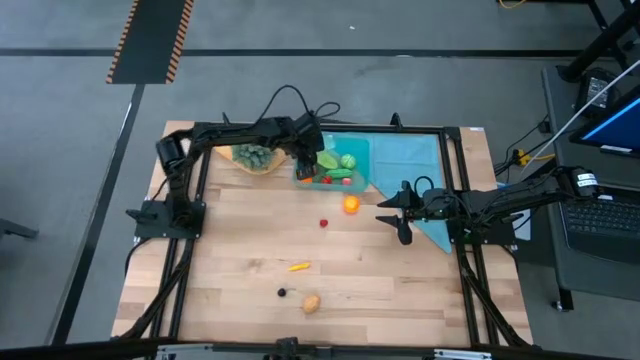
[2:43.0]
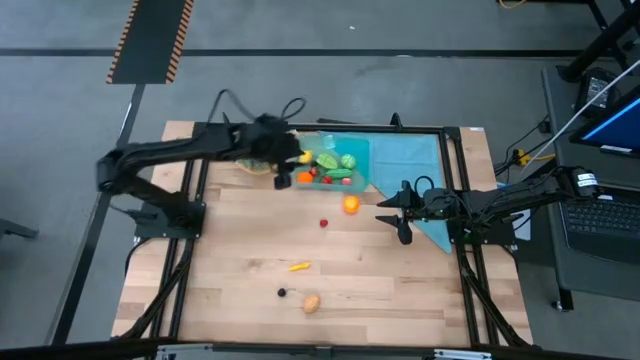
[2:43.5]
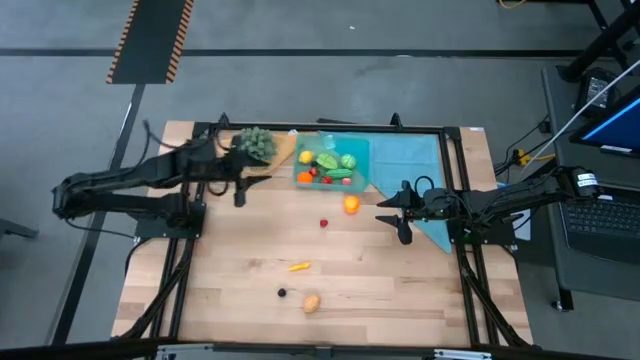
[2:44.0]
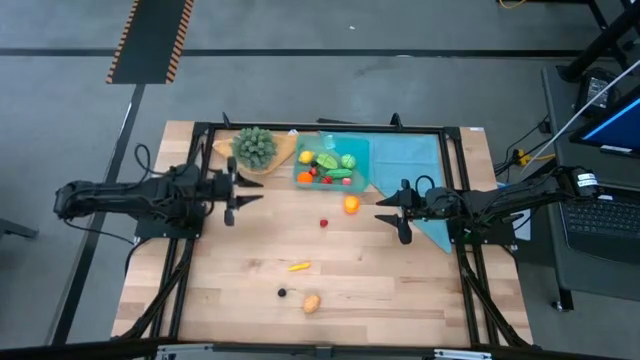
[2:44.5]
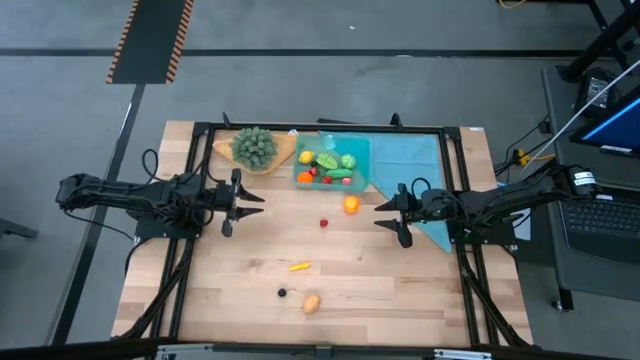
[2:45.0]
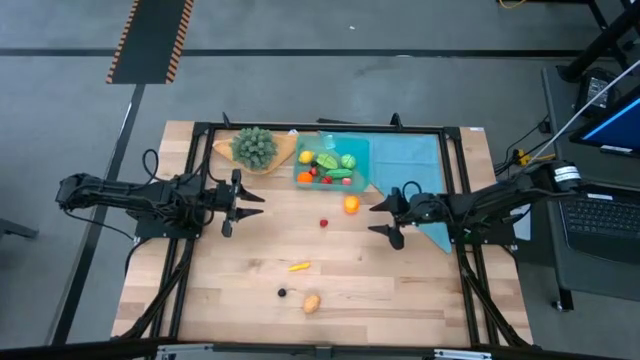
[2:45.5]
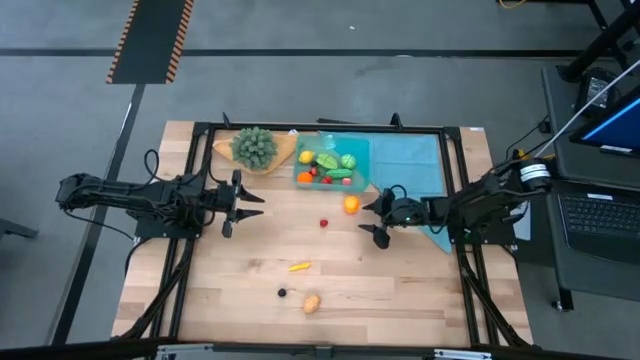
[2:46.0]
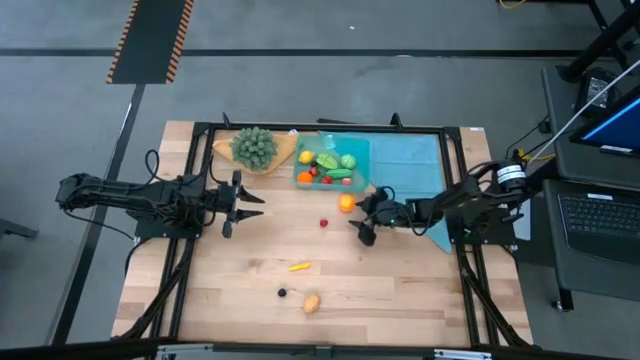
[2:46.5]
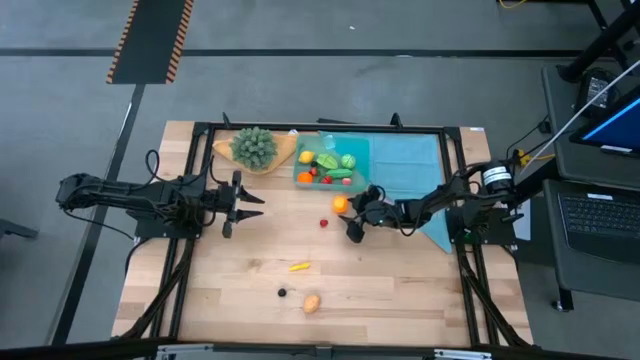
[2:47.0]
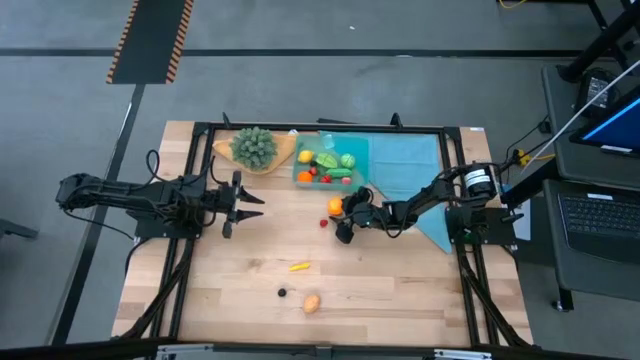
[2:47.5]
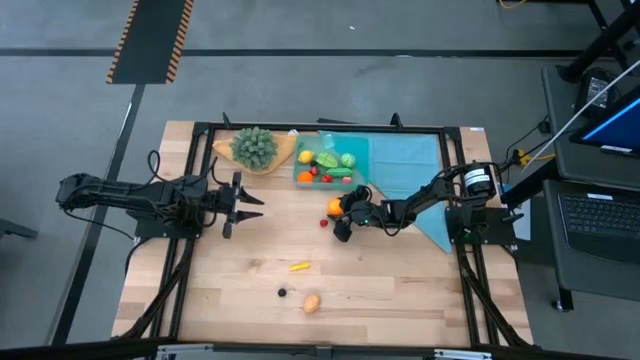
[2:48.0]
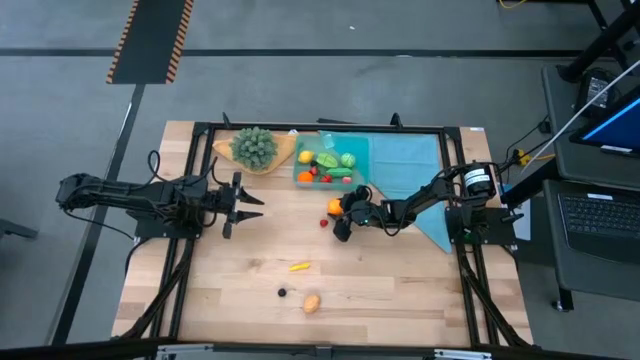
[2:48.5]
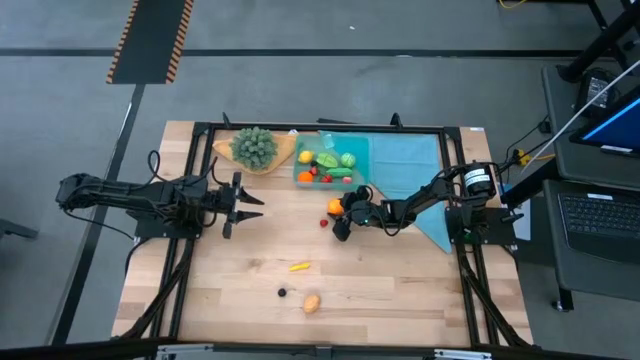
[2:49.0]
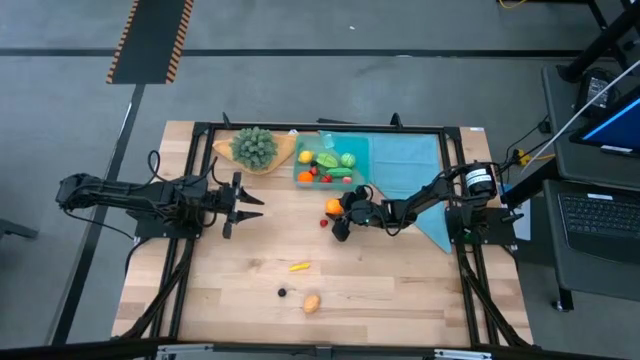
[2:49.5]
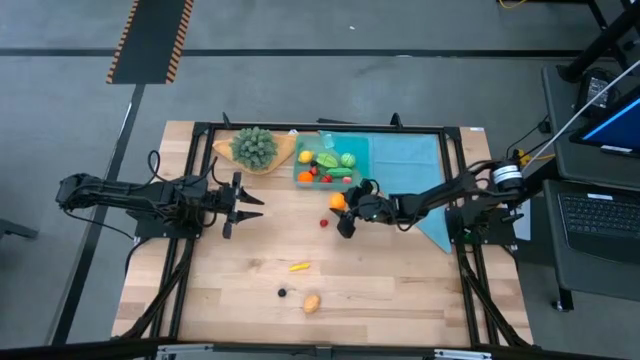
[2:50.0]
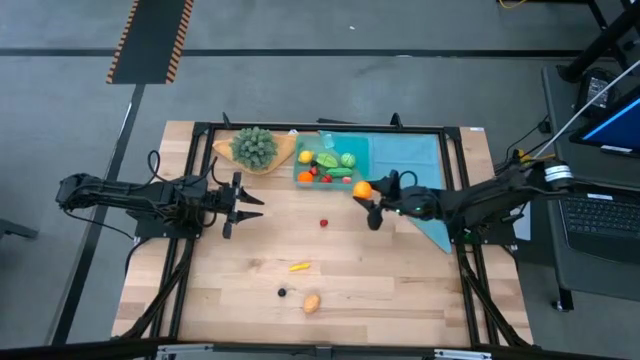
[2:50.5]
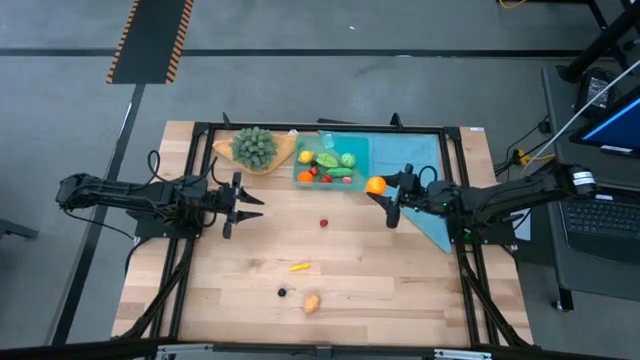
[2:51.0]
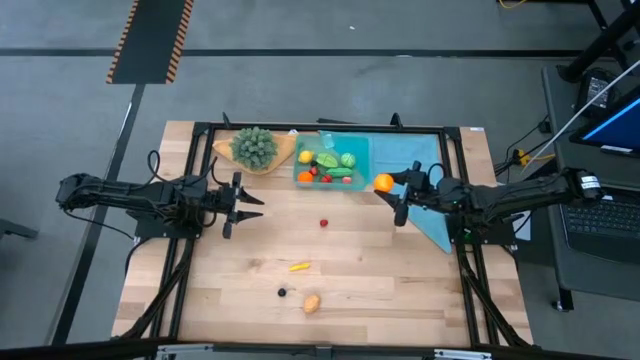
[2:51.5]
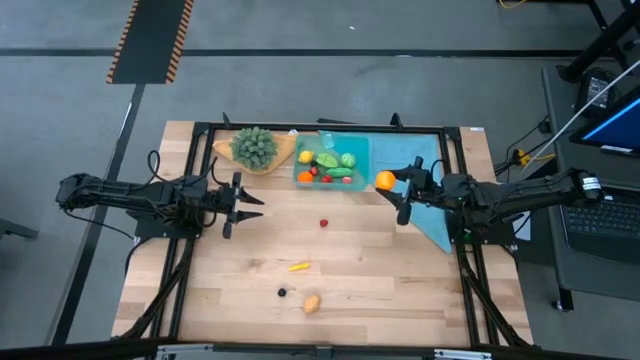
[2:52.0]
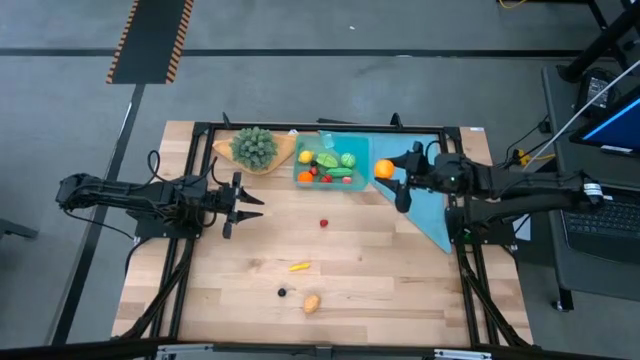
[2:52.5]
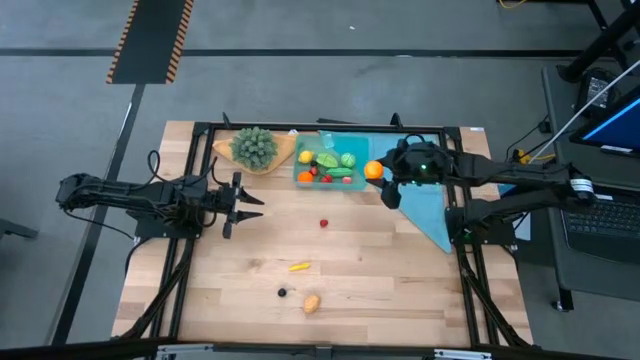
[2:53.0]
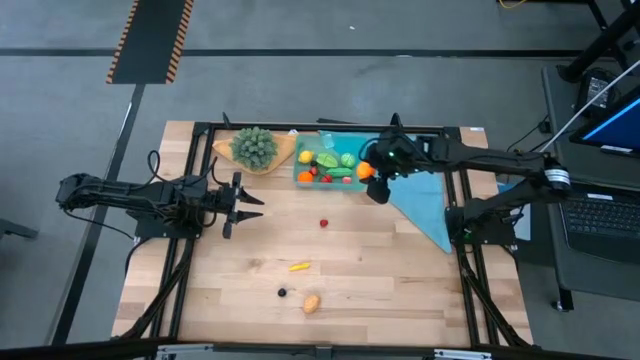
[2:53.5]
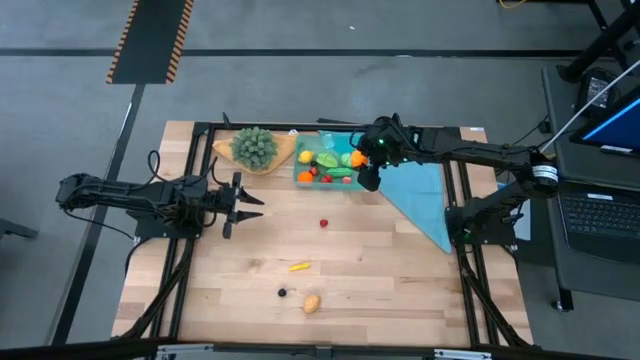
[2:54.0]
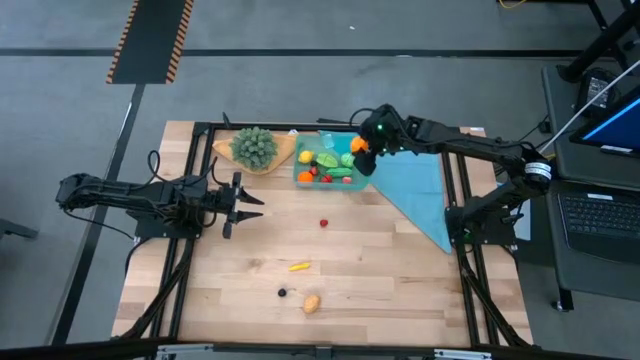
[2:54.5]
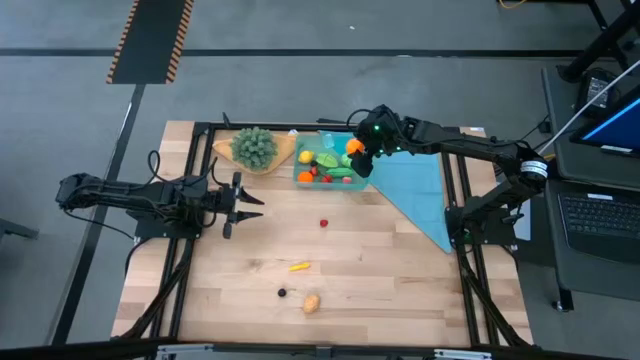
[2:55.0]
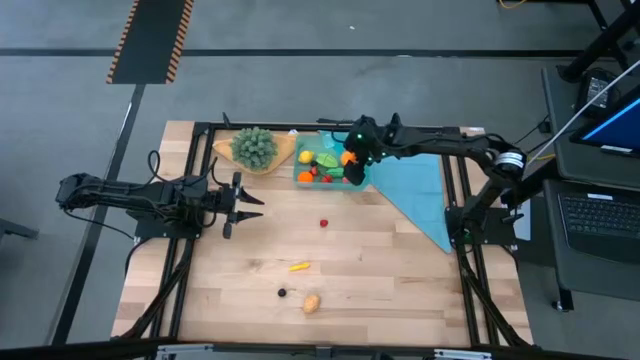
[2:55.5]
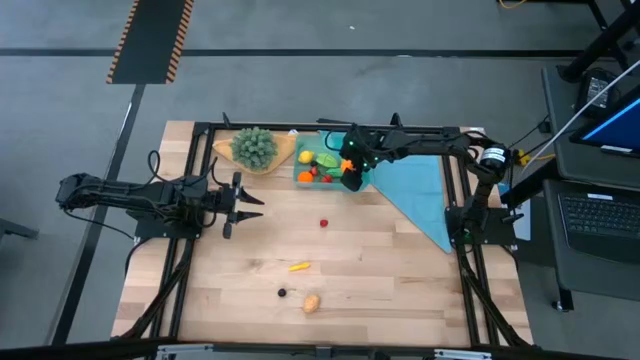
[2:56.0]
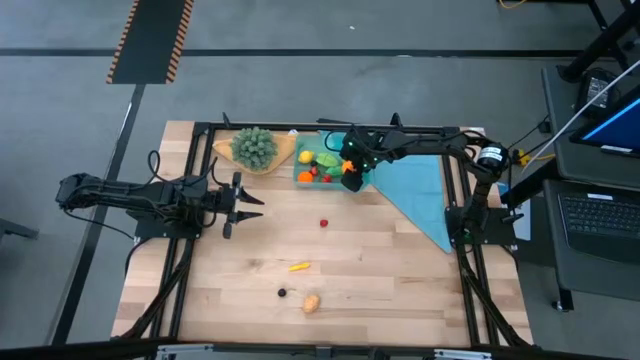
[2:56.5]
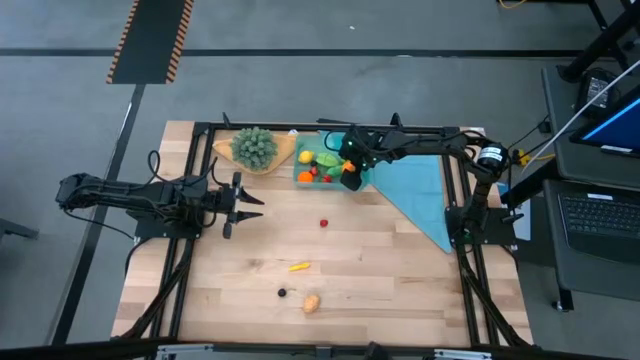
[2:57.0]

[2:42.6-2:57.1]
Task: Pick and placing Produce into tupperware
Put the orange into the blue bin
